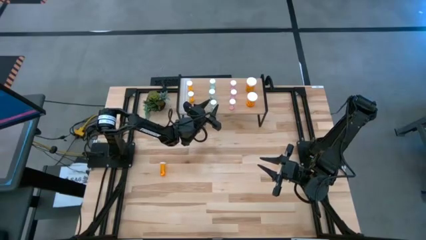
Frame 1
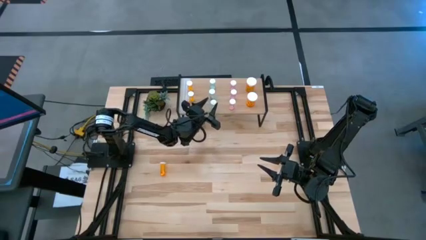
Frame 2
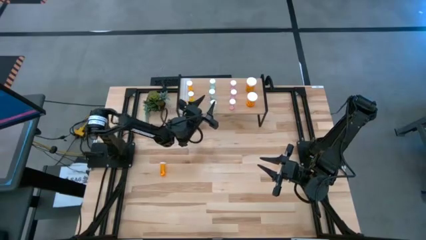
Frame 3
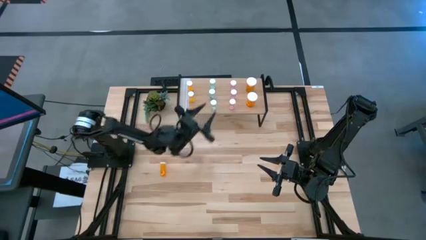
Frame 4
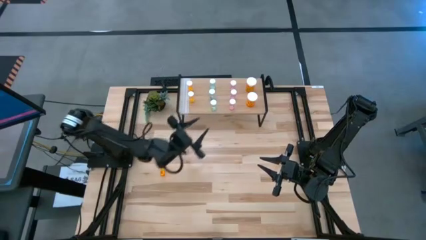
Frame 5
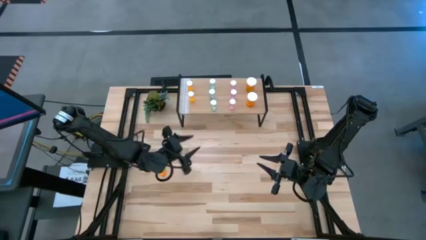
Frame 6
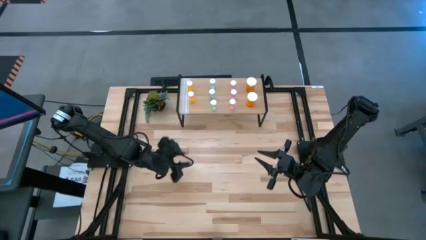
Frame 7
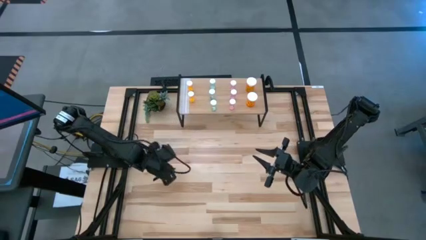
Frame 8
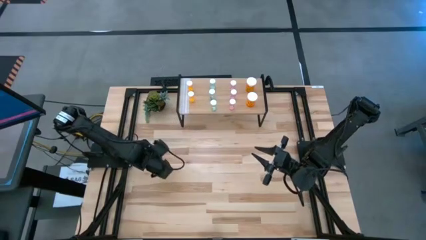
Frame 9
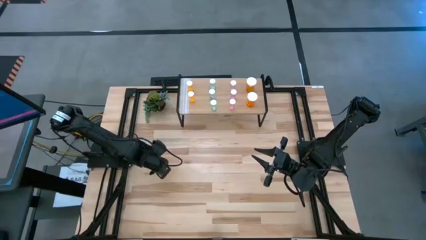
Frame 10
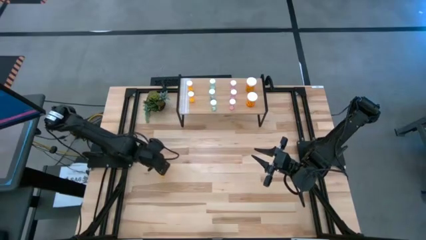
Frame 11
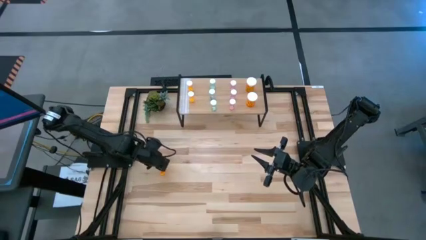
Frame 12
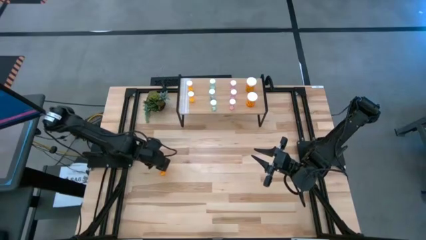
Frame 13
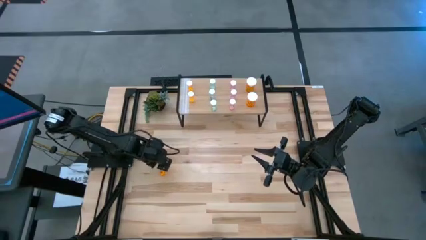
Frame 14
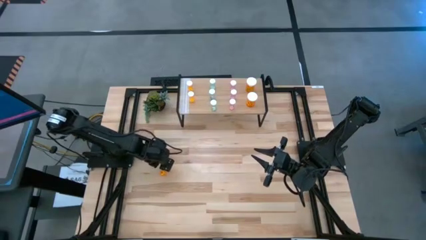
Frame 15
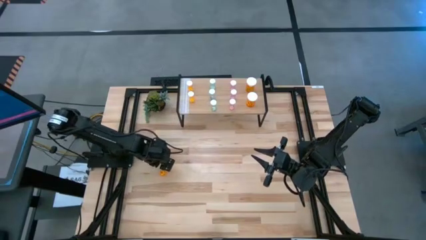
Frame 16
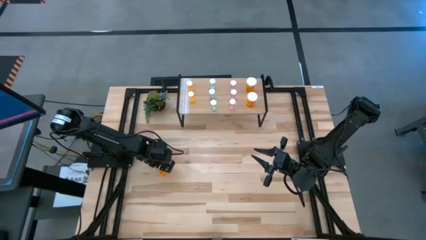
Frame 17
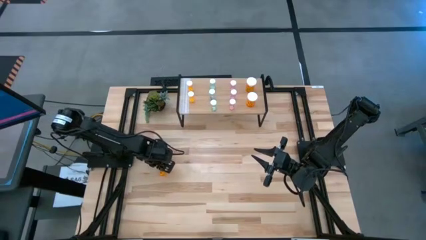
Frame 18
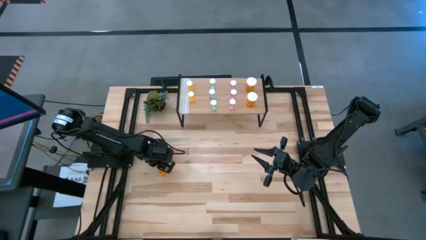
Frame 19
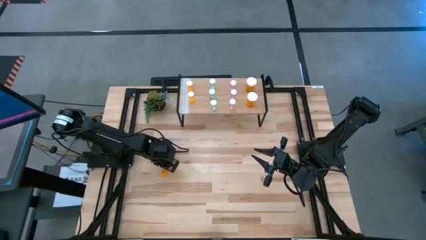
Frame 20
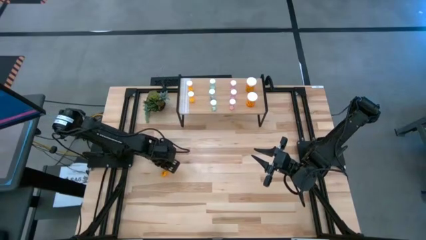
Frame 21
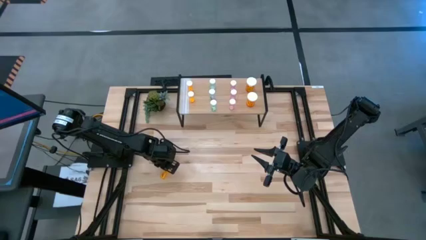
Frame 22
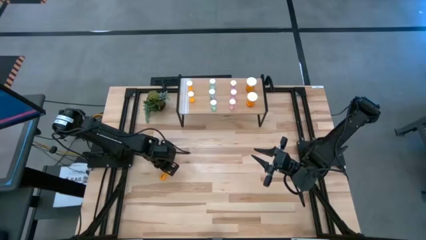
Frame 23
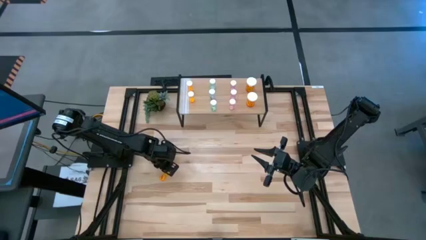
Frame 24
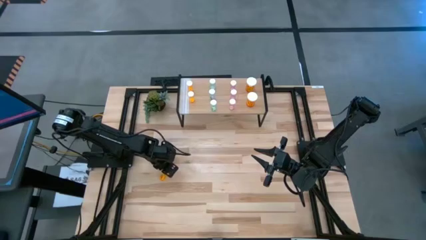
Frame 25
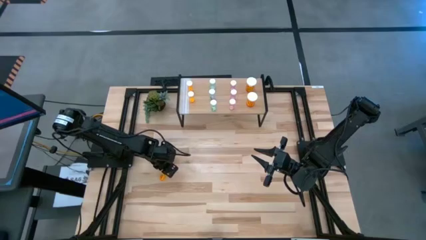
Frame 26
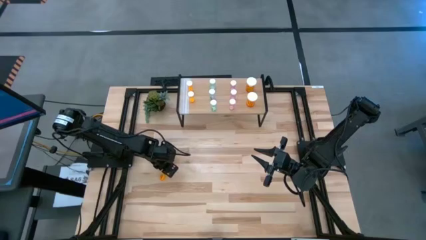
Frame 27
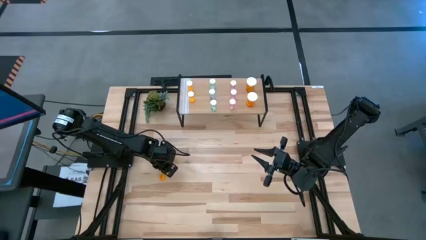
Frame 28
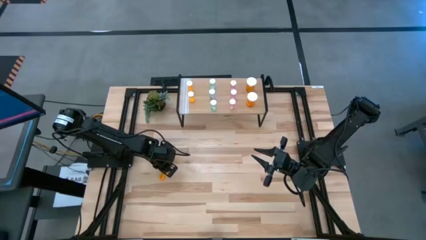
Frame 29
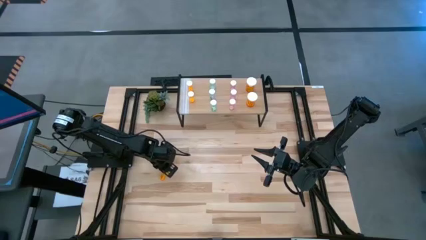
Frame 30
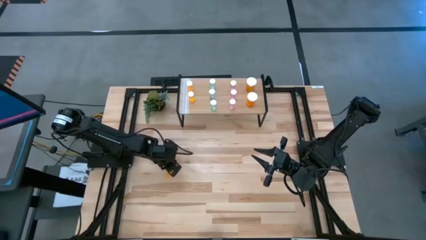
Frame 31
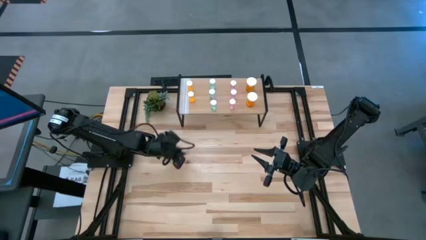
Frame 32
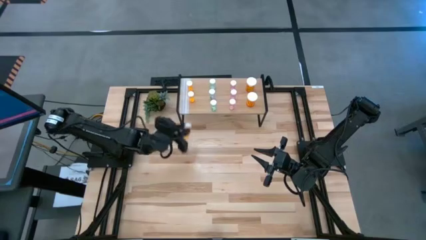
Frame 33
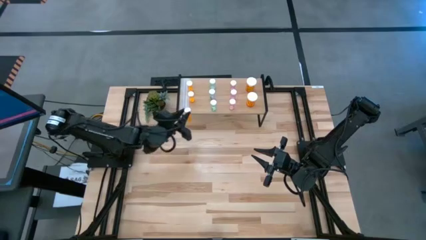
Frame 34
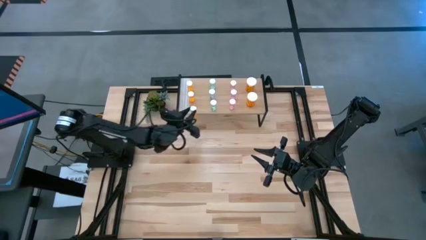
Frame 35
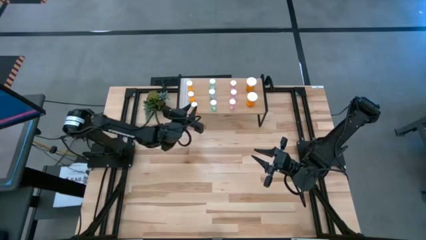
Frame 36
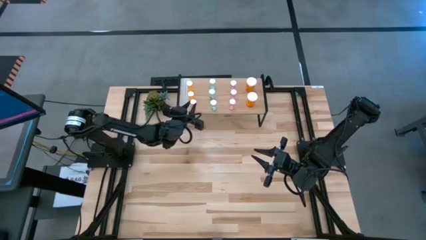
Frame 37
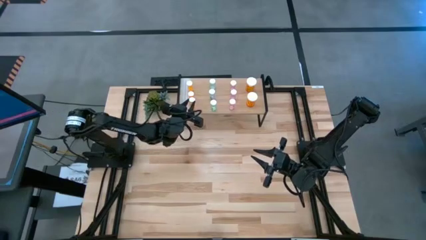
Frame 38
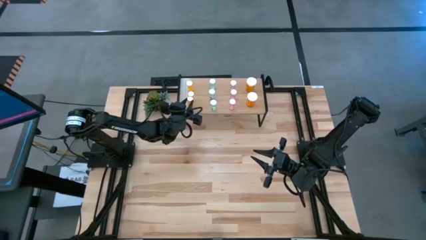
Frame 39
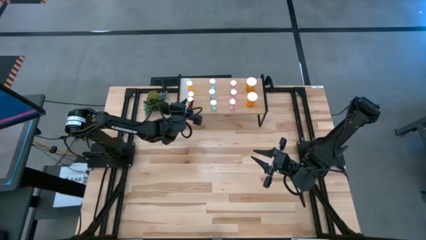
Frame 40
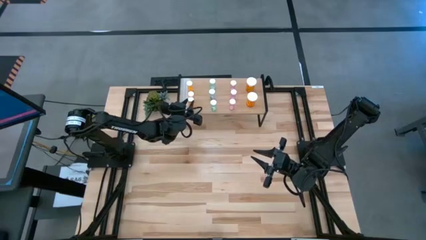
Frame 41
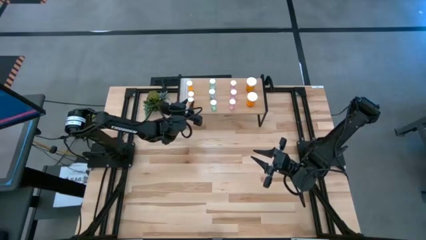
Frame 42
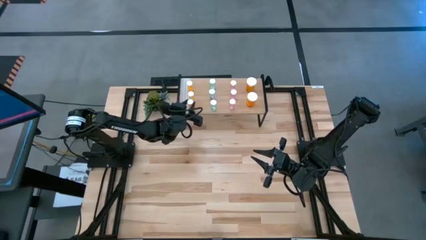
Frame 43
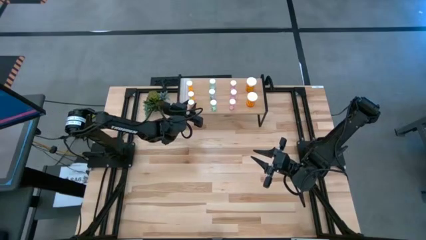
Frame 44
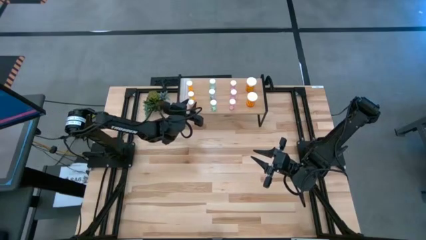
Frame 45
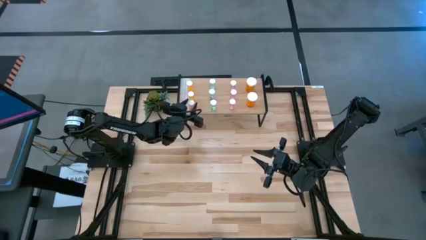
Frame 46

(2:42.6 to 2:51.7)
Task: Pick and place medicine bottles onto shelf by color
Put the small orange pill bottle on the shelf aligned with the other orange pill bottles

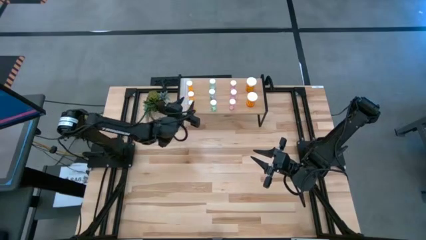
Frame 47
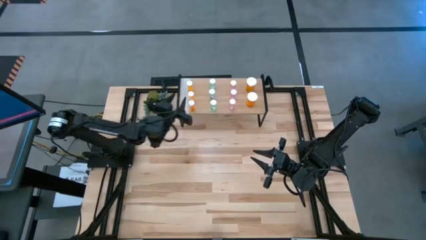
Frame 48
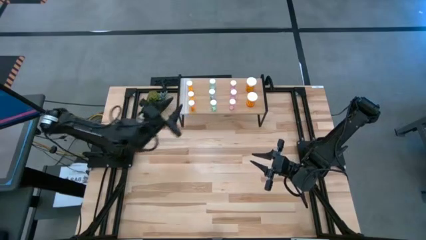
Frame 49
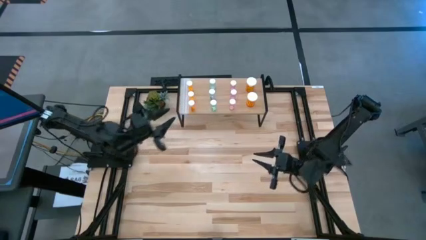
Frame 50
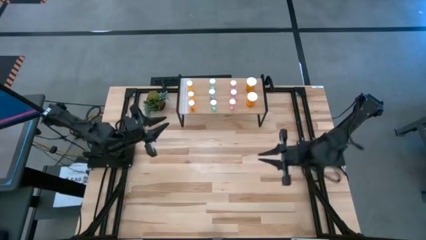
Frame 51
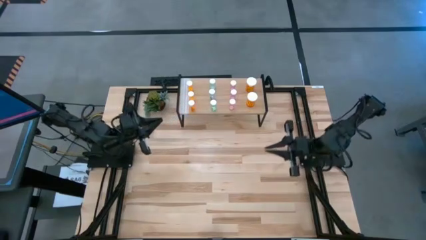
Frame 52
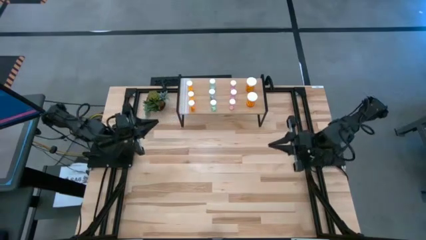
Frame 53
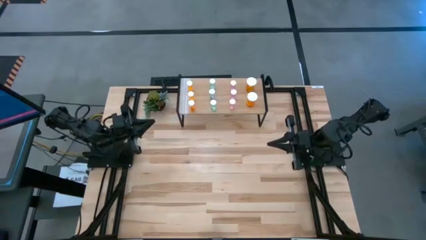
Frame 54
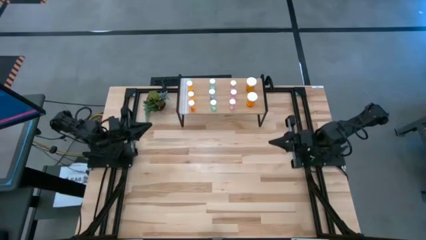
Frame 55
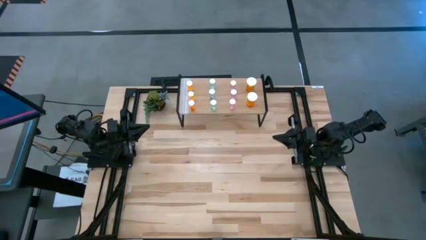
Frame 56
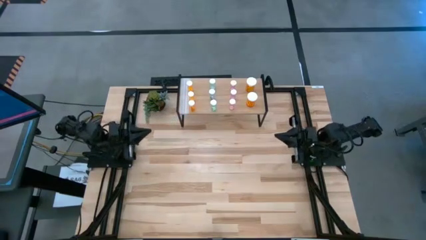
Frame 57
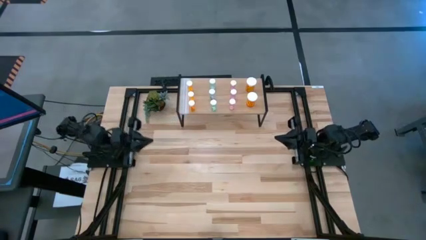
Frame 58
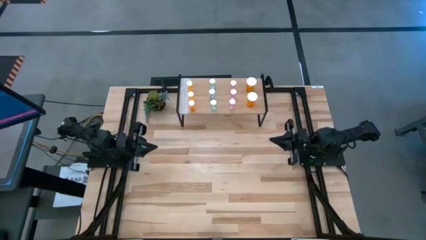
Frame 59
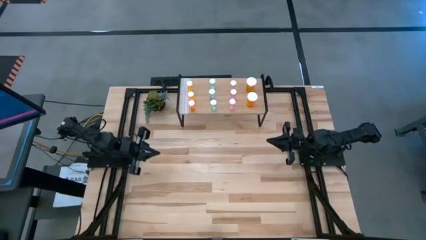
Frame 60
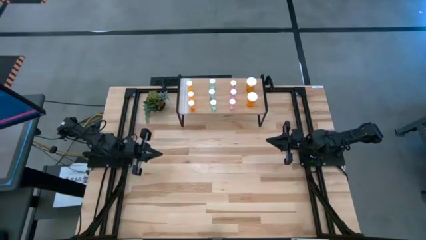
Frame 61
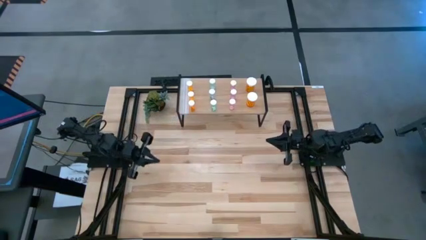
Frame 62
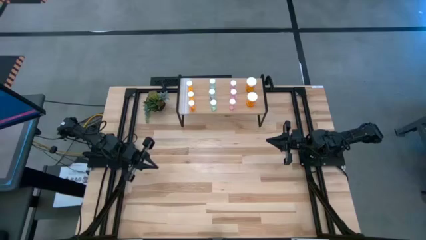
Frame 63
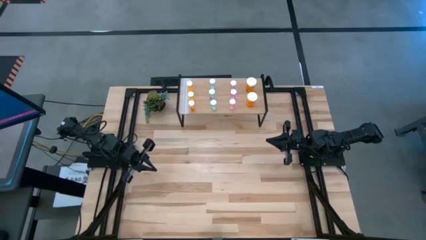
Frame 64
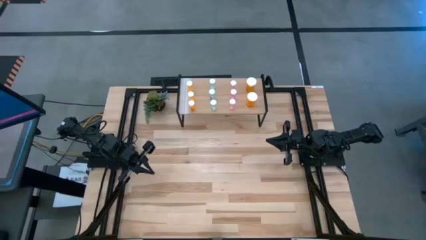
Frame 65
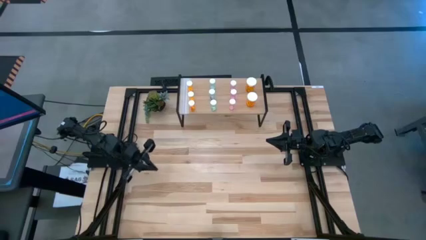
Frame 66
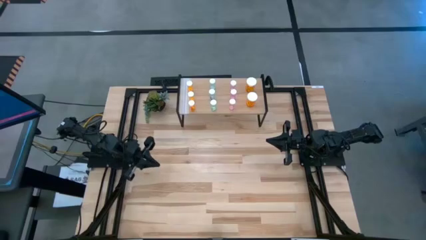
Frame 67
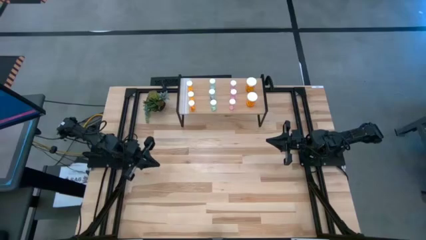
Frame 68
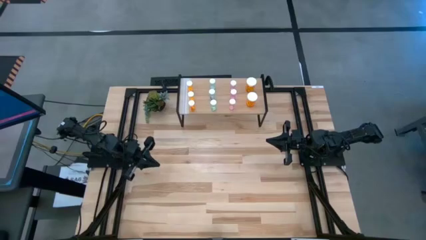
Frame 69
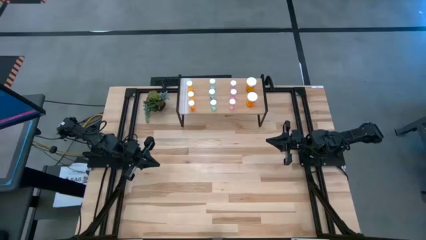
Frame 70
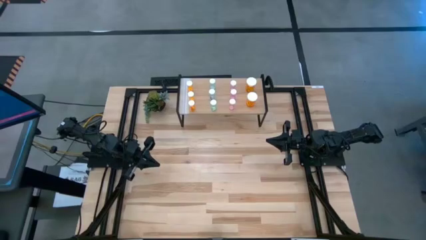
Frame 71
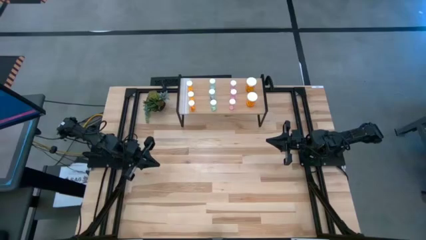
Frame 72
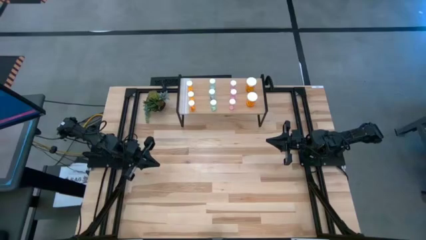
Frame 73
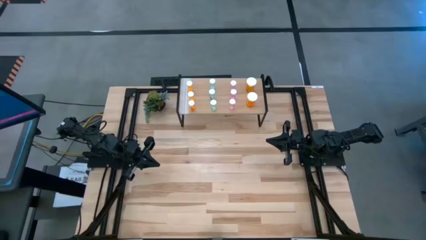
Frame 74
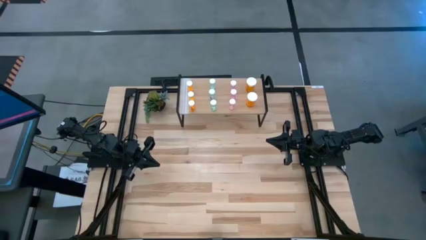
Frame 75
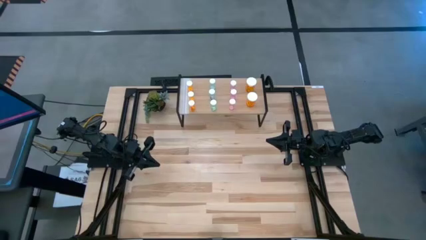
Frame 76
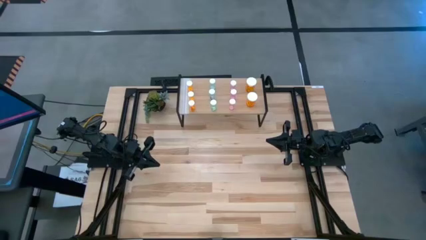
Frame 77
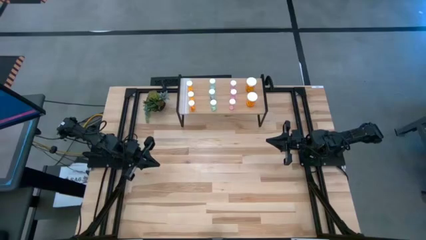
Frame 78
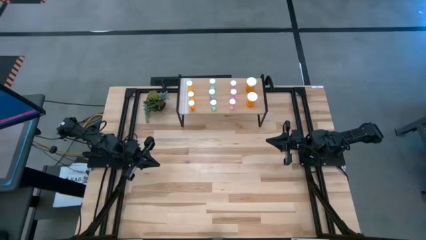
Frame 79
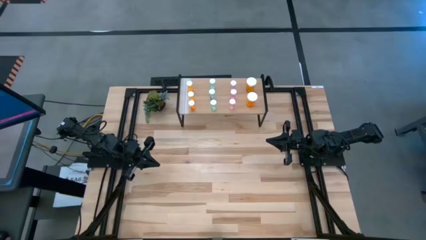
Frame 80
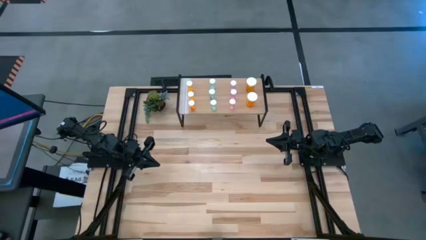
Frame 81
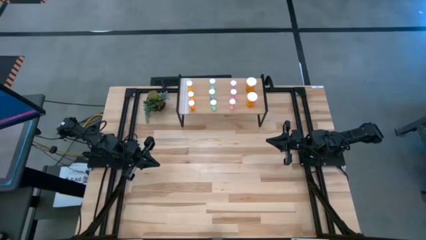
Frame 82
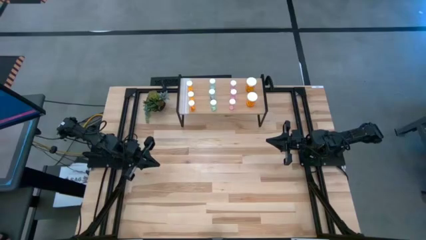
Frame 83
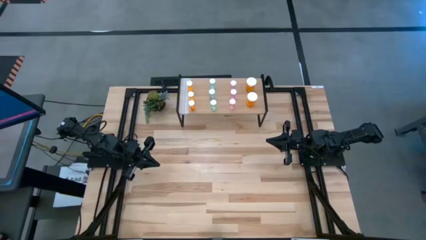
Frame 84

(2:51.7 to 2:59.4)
Return to Home Position
